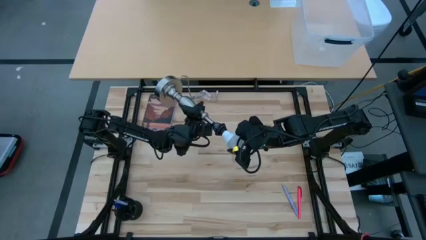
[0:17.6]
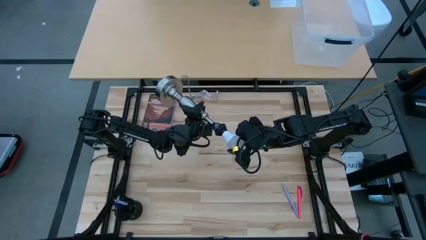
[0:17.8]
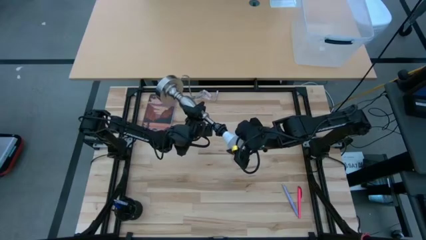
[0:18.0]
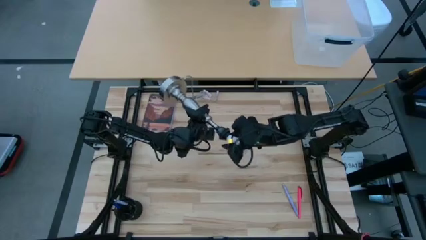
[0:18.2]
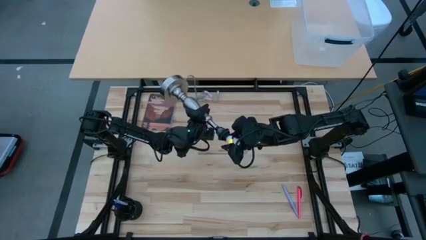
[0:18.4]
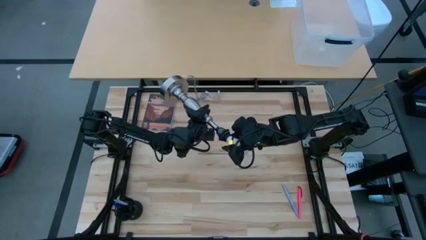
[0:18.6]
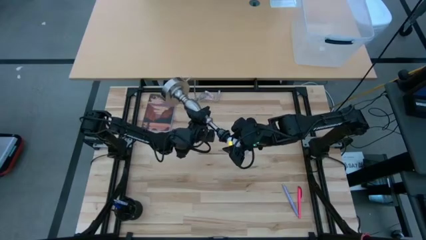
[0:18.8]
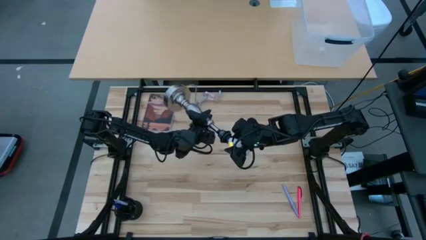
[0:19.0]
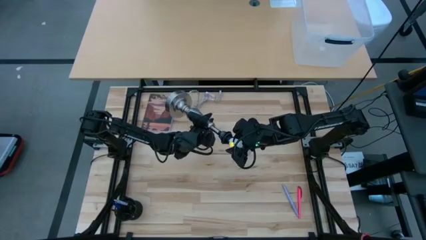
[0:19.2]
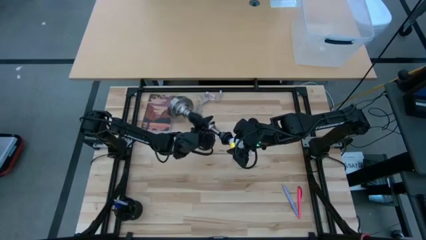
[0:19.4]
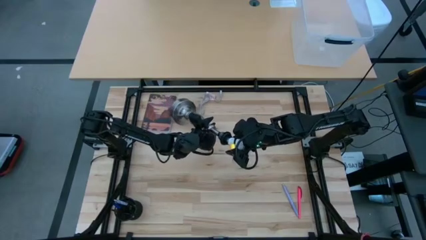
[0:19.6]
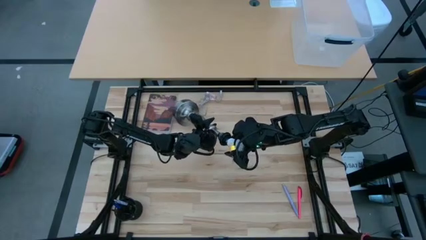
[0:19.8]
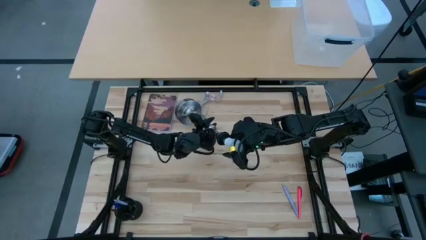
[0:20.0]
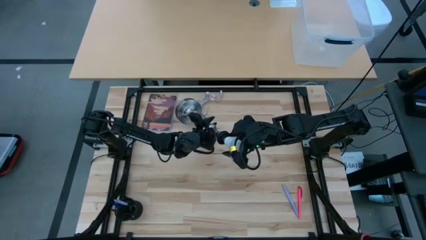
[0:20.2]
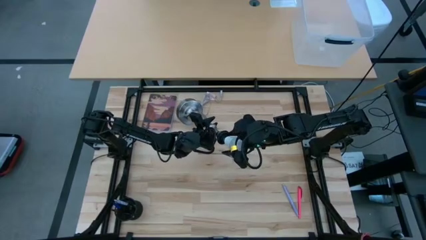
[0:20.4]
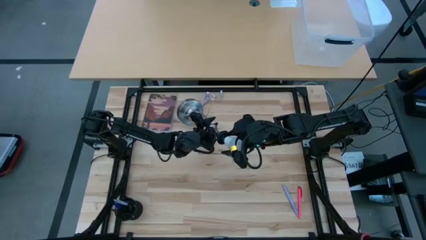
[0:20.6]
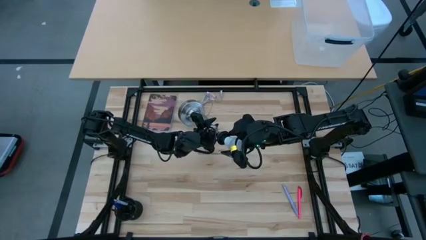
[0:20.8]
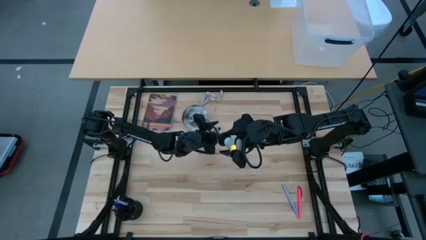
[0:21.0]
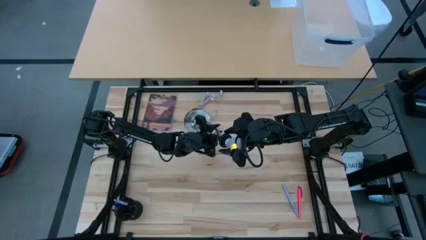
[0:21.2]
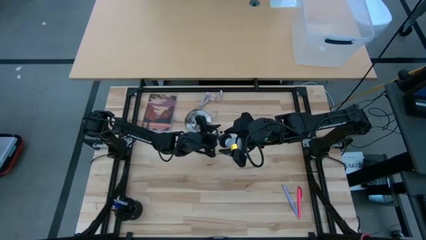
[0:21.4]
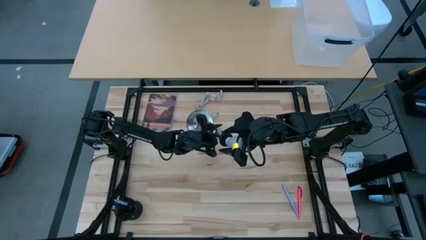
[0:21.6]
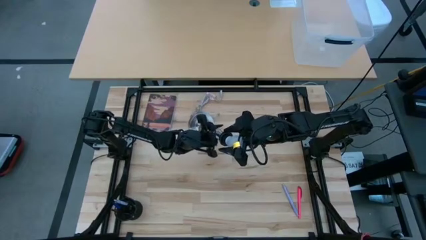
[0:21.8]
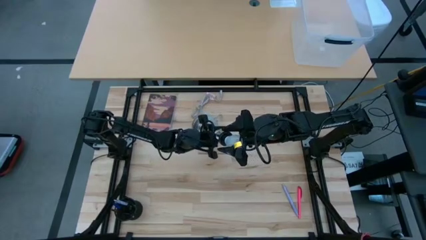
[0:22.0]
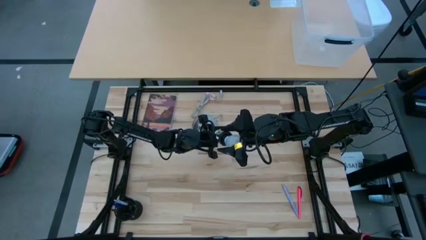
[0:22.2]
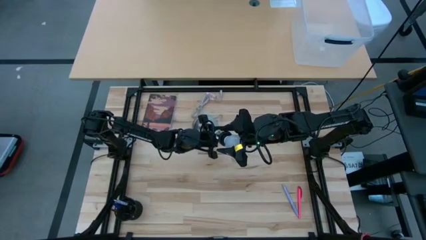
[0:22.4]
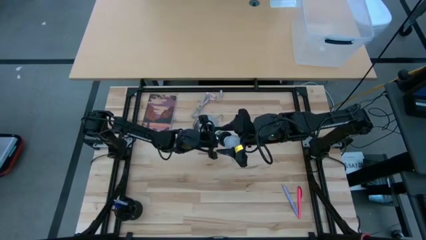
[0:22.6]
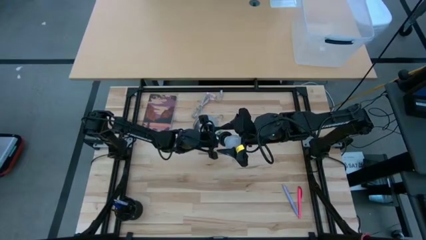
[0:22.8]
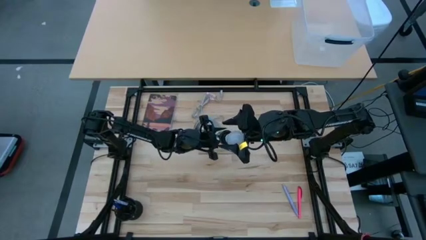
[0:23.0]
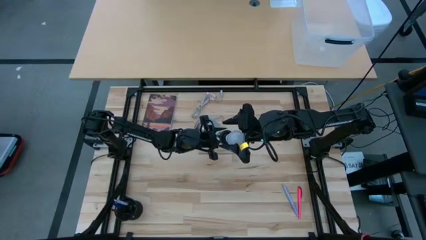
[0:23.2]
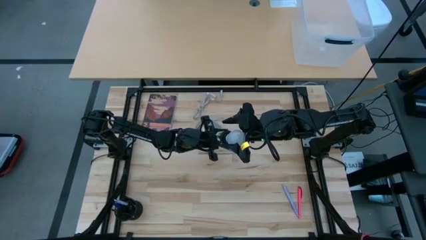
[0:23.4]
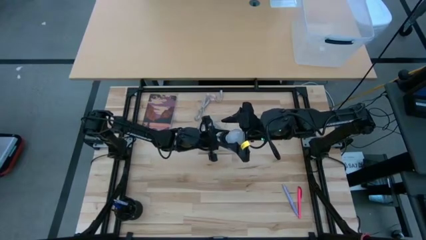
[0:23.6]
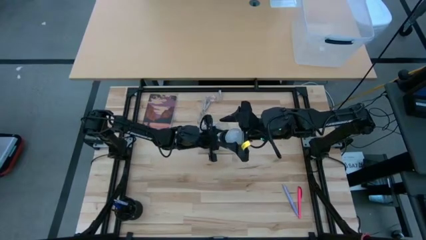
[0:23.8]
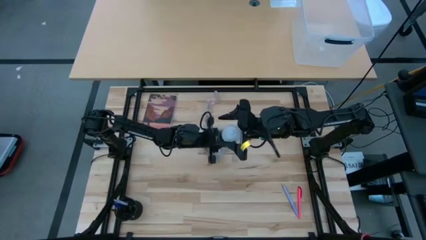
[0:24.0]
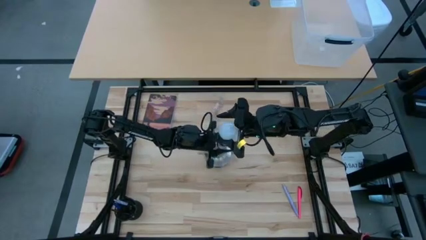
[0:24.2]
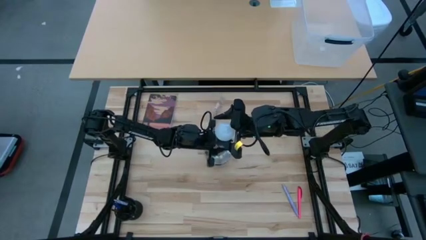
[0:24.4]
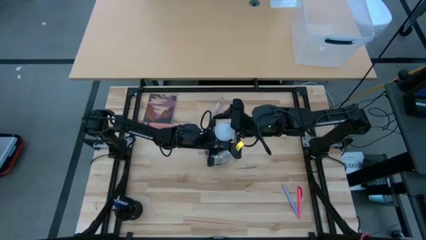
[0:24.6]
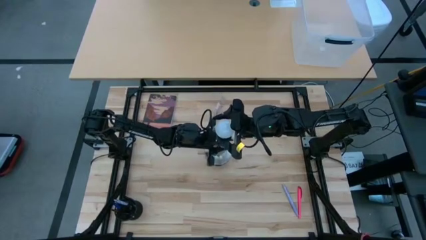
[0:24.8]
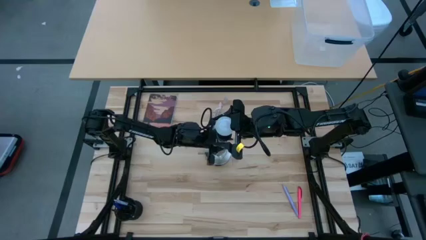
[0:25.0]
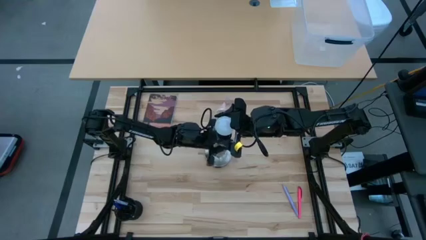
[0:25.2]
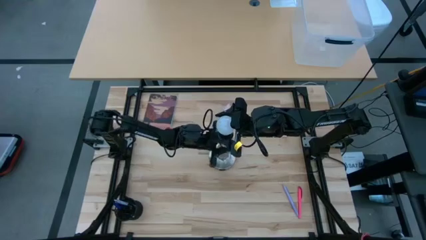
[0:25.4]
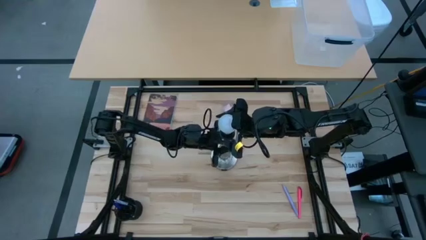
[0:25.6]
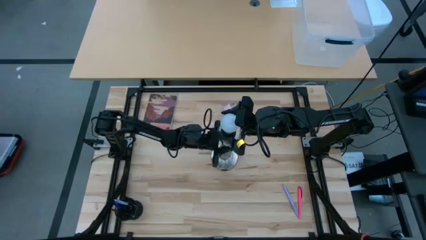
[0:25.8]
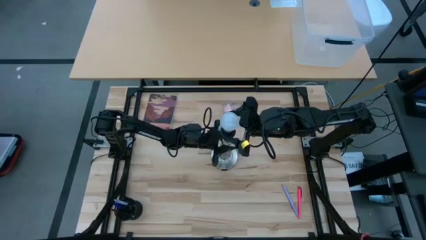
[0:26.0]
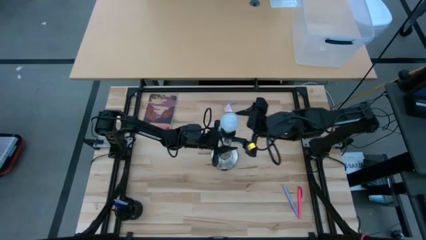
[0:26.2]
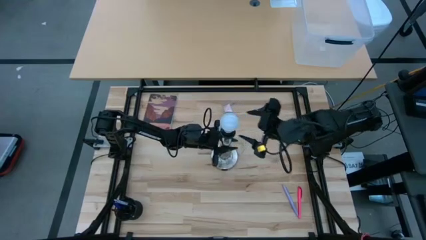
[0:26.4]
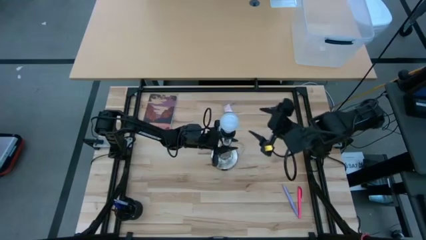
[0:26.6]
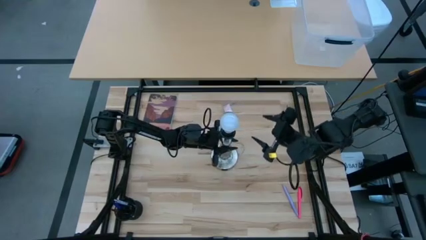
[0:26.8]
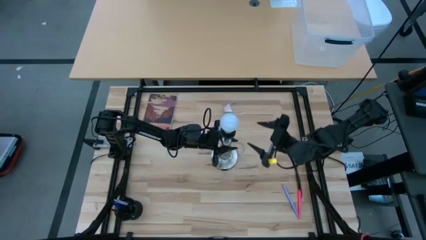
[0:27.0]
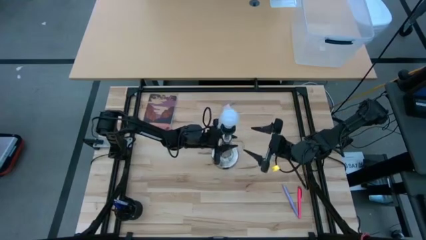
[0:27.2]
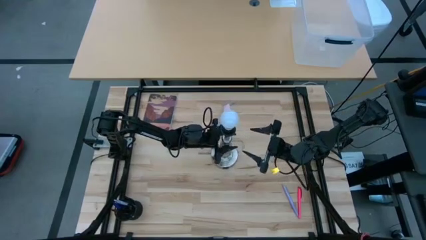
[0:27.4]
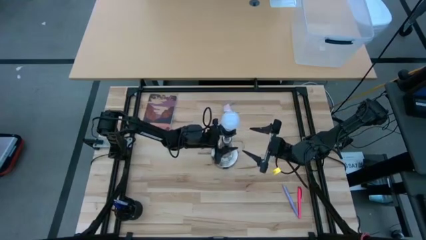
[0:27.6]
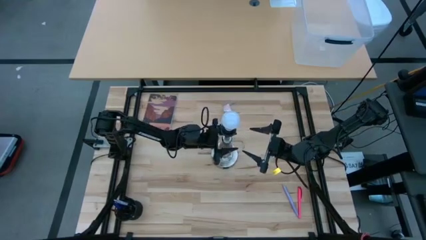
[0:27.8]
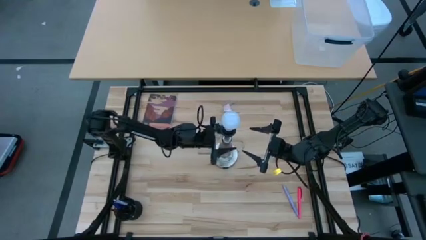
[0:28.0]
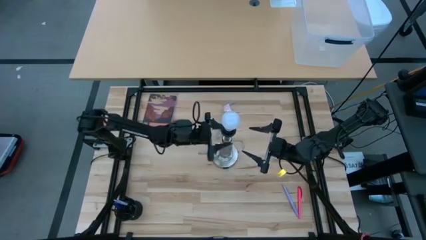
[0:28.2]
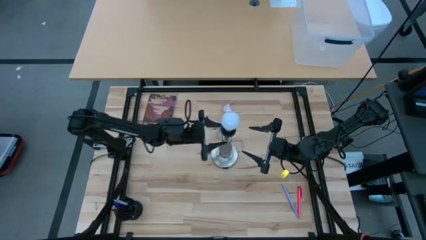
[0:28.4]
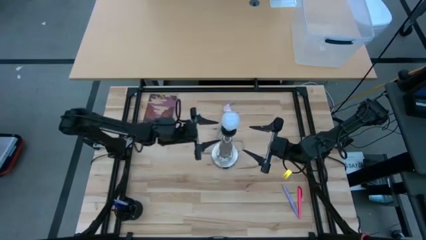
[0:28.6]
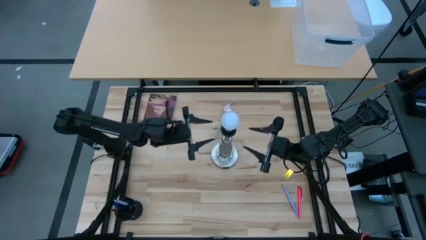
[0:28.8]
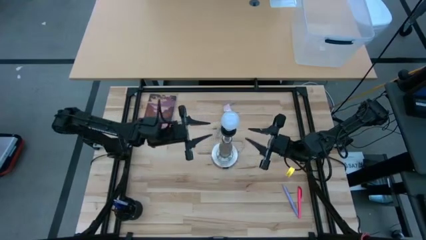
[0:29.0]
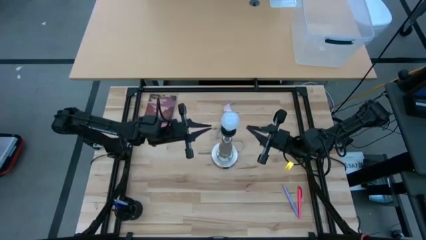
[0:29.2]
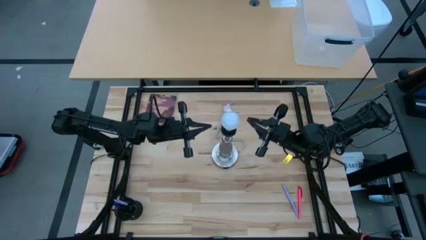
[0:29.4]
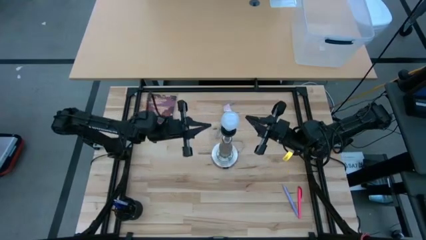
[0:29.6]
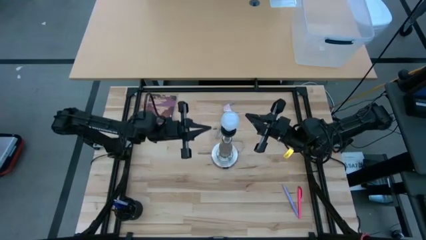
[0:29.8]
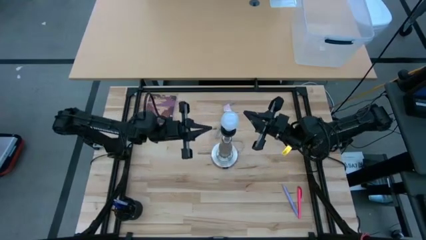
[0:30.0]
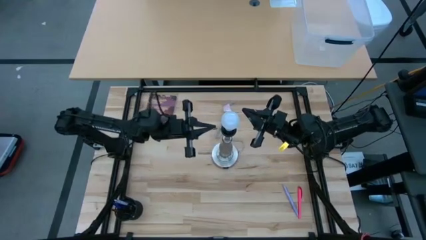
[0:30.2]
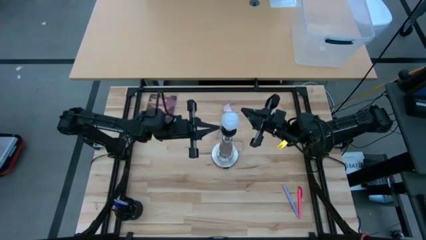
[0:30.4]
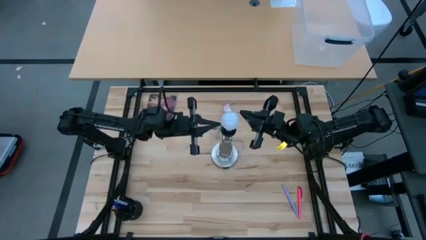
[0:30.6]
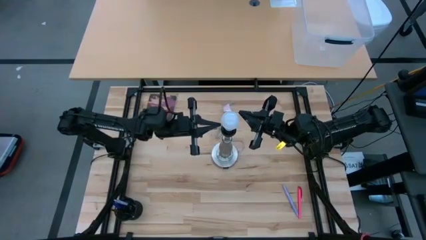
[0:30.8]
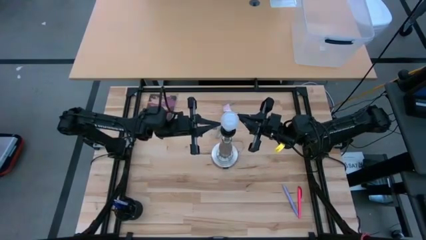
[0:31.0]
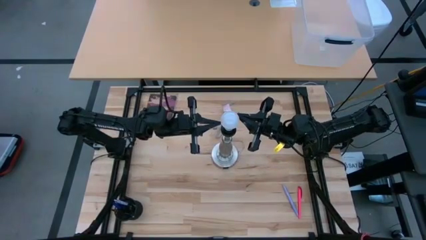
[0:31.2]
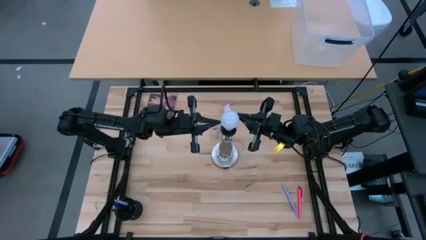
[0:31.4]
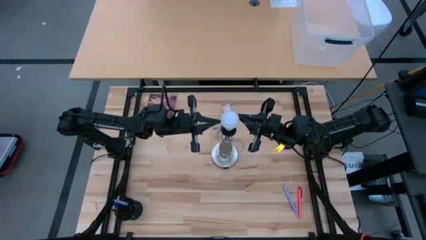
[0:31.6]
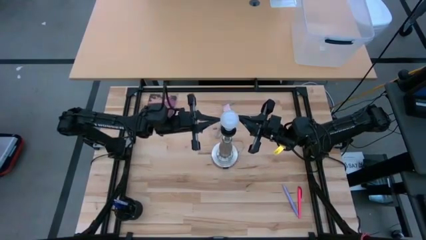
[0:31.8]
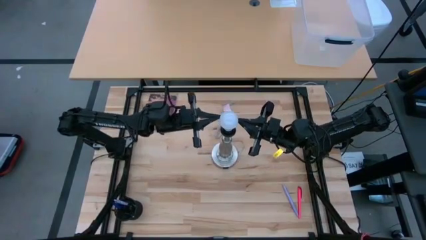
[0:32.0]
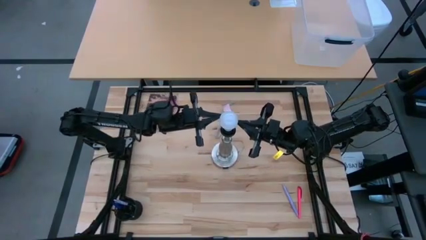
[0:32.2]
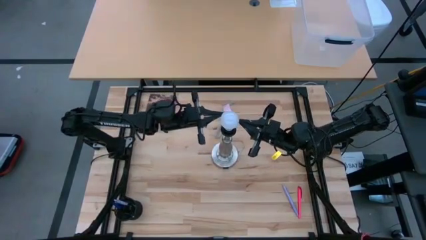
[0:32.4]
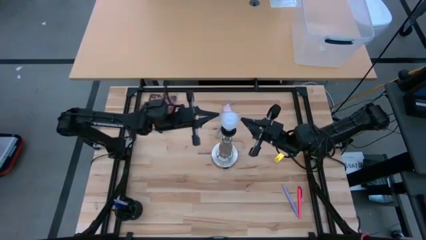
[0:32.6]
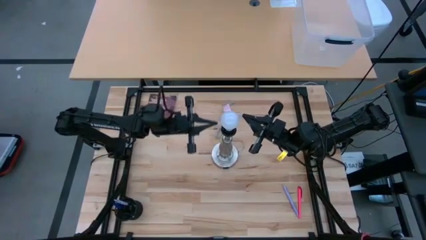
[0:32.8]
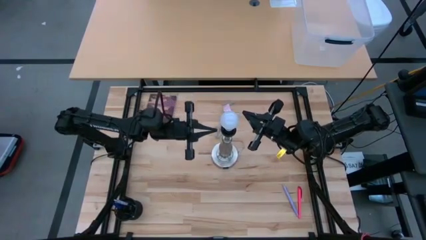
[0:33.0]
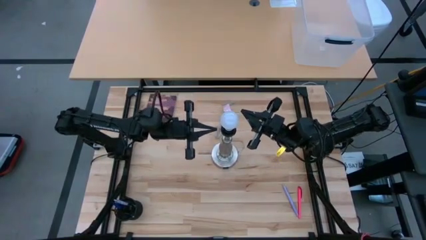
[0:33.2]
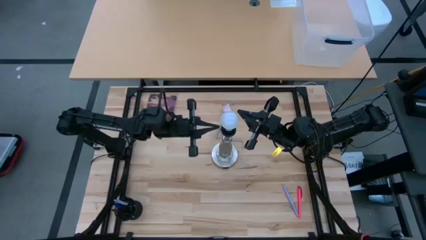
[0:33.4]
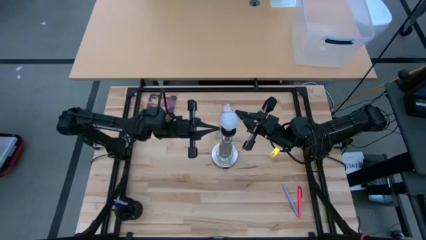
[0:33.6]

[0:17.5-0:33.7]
Task: Screw lightbulb
Insert the lightbulb into the lamp
